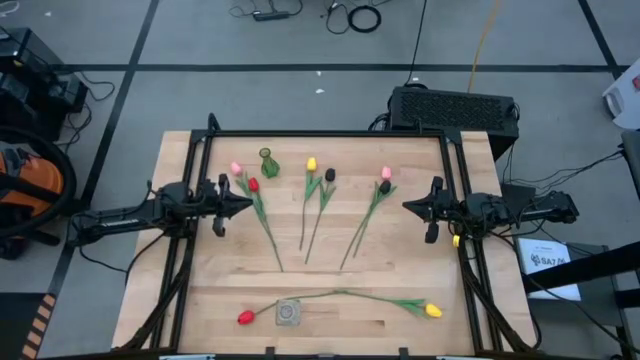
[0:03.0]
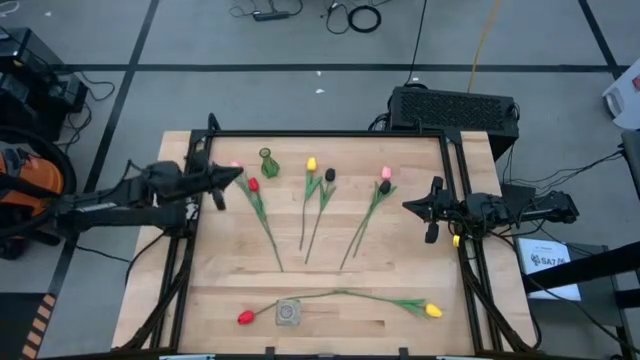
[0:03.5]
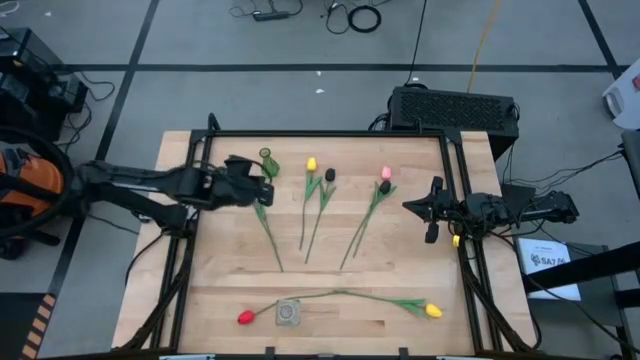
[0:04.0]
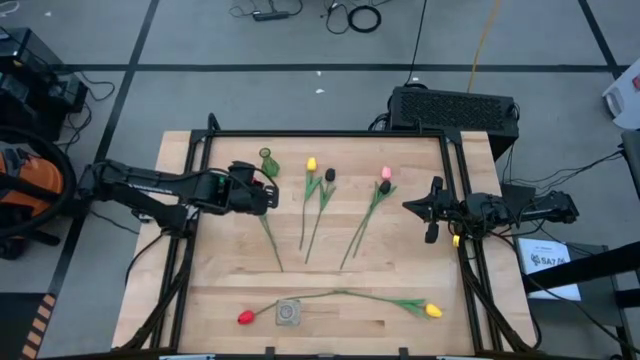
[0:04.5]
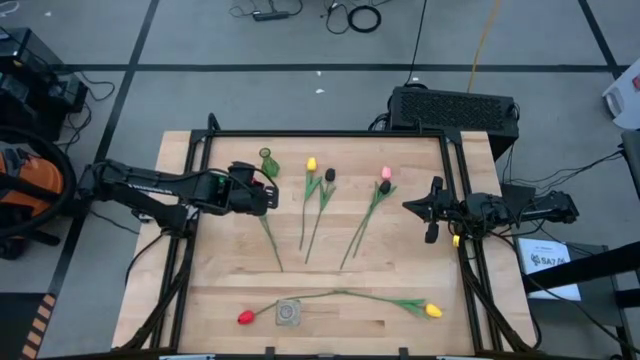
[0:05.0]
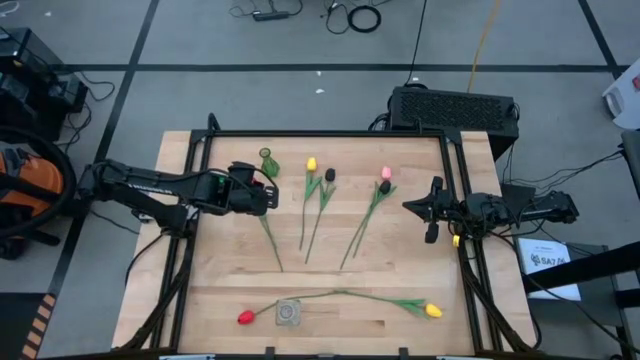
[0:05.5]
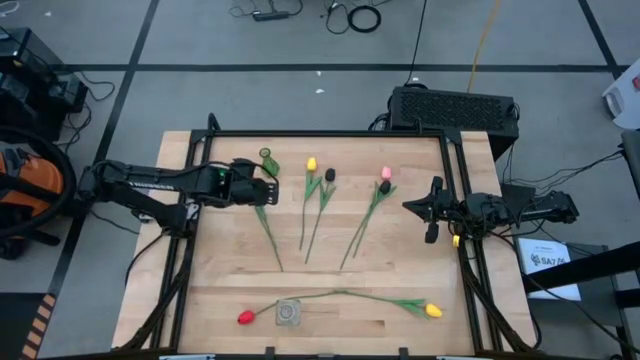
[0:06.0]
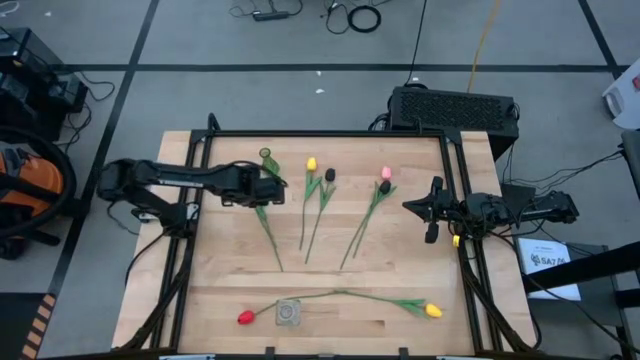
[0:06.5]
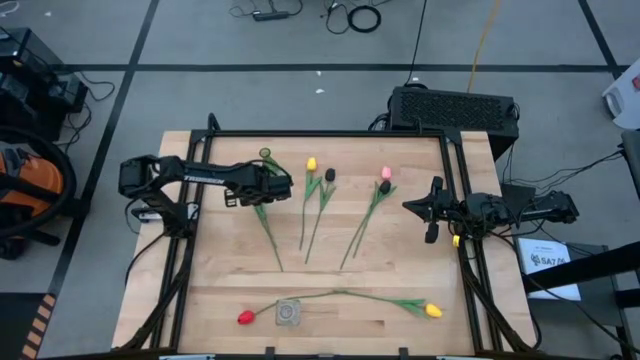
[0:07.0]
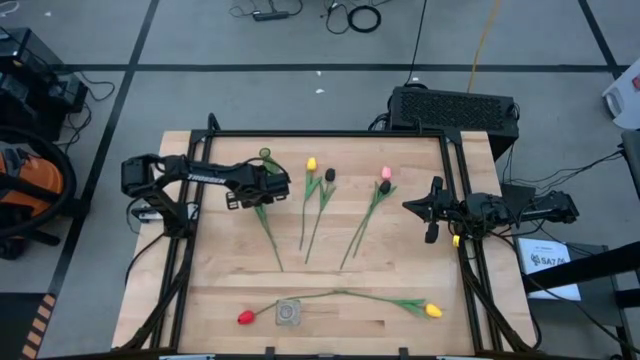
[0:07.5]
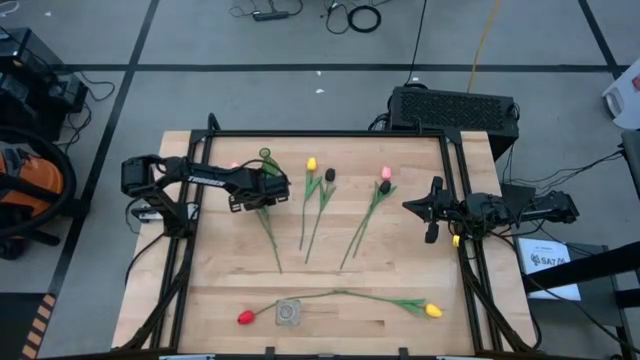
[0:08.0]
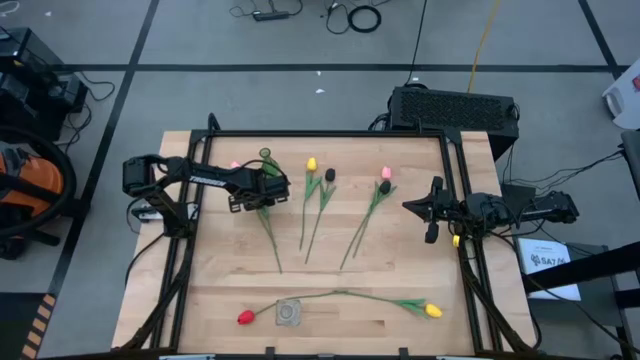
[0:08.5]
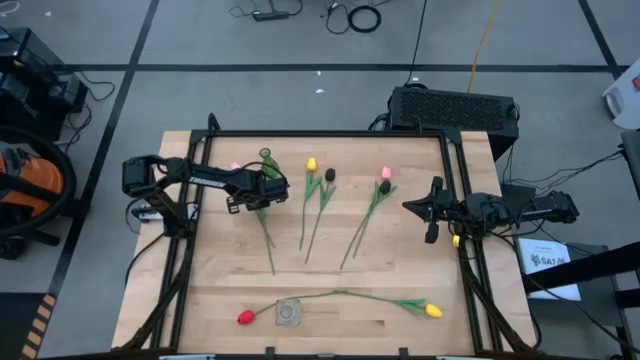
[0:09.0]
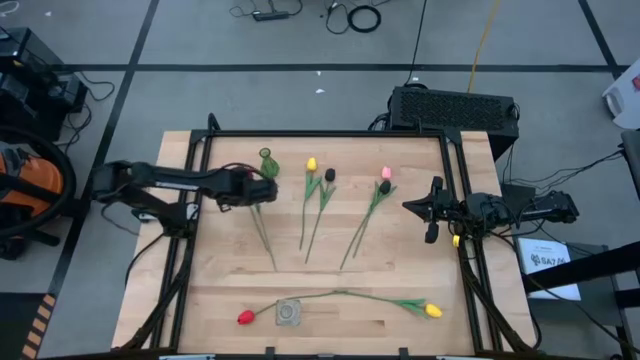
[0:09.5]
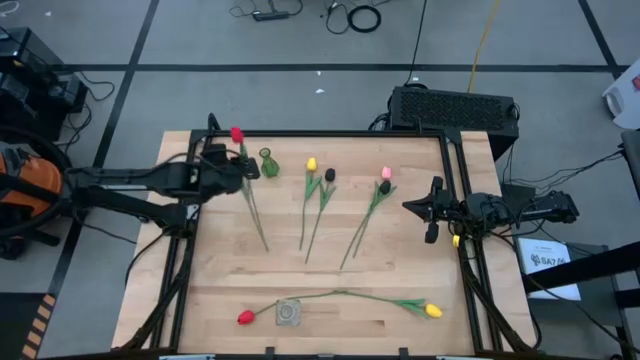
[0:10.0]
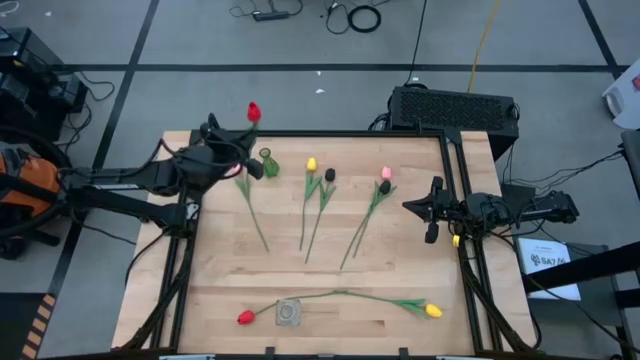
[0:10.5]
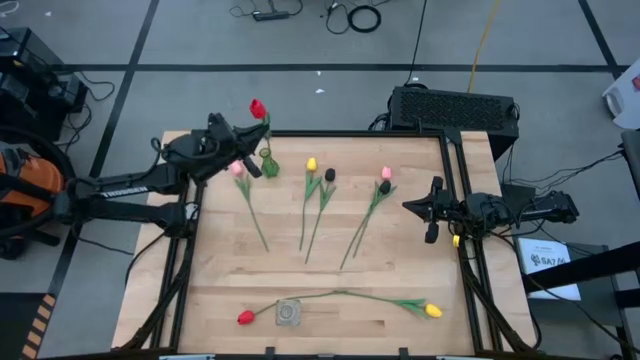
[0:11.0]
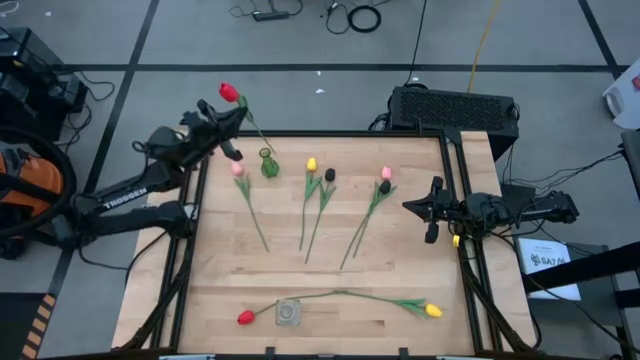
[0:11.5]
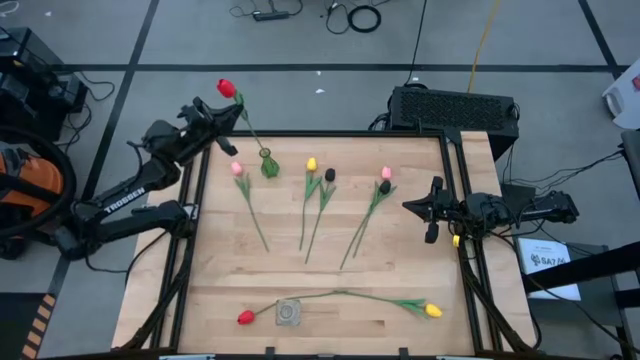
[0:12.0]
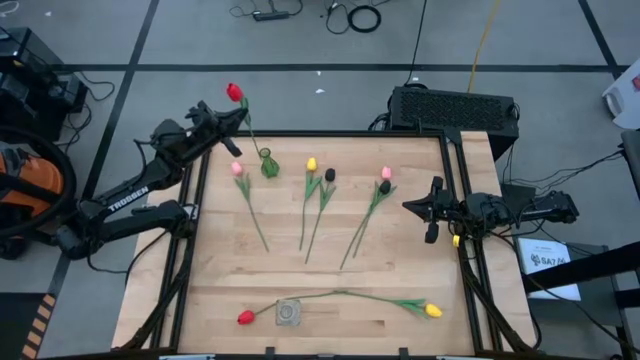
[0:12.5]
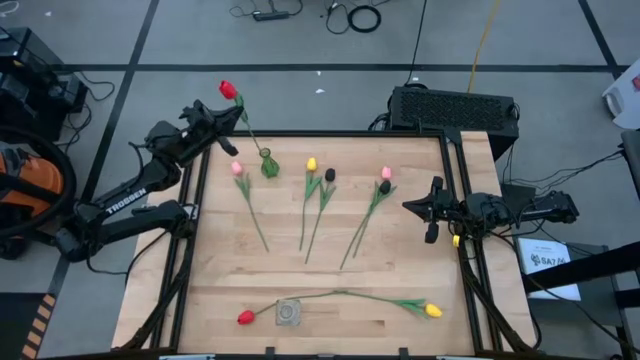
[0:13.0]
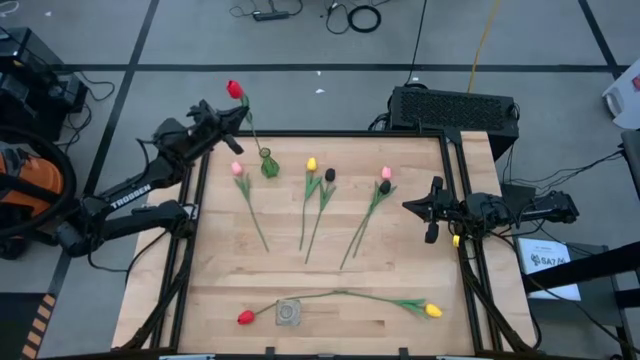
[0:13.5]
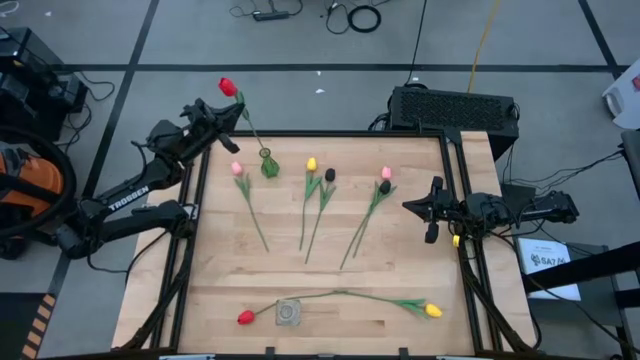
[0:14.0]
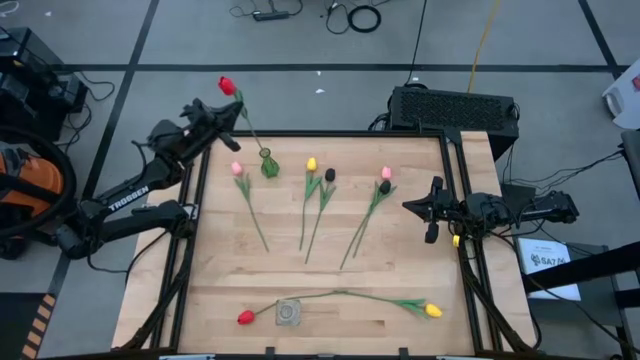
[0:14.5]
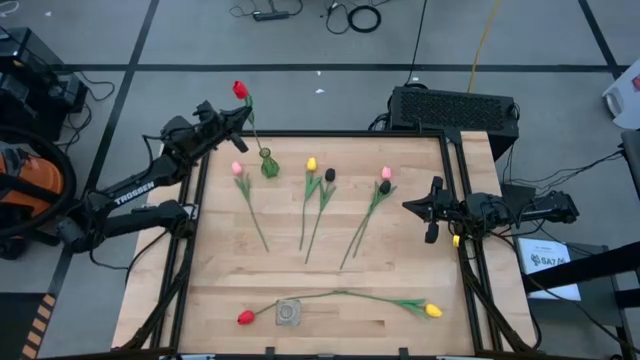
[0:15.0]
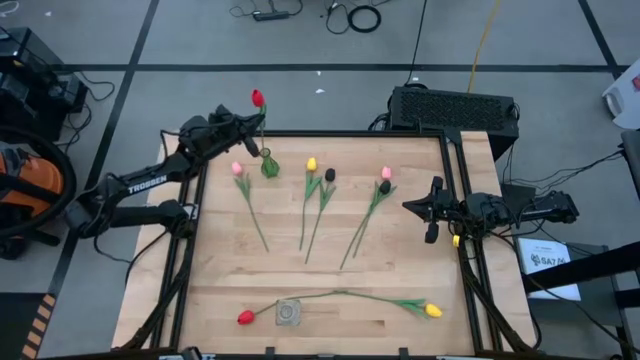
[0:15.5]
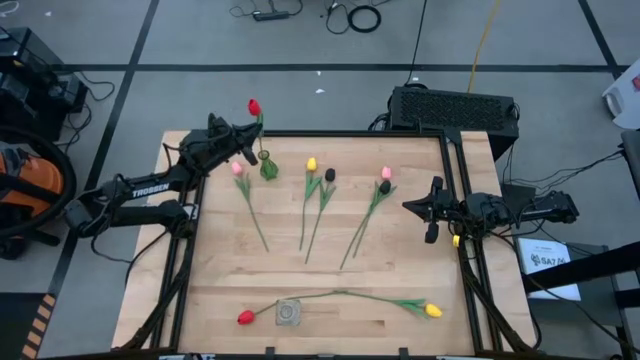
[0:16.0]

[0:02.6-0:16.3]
Task: Sort flowers into vase by color
Put the top red flower into the green vase
